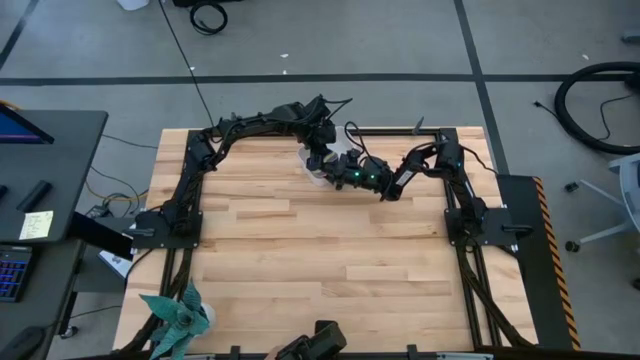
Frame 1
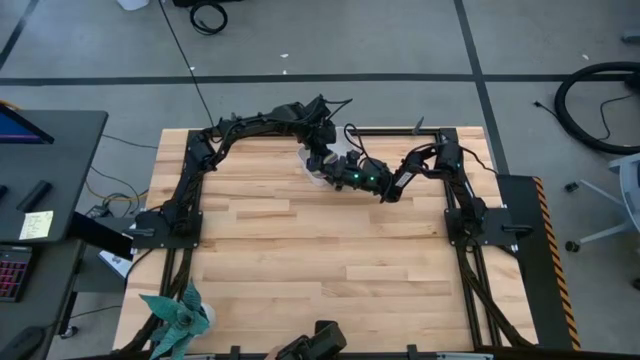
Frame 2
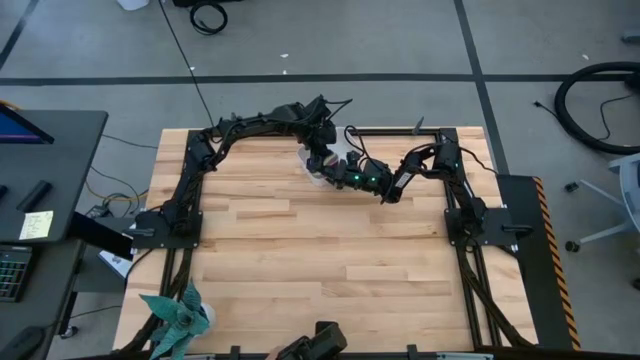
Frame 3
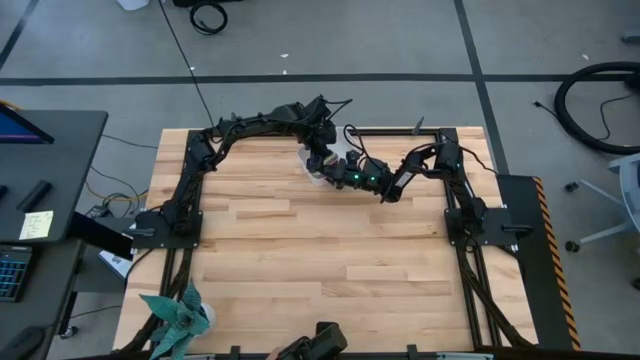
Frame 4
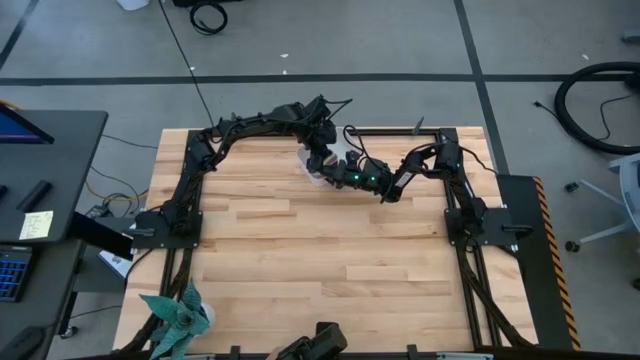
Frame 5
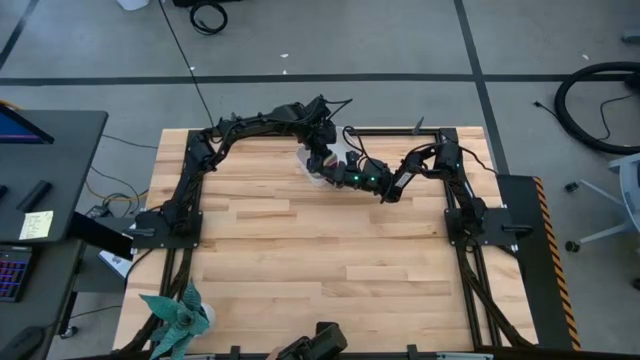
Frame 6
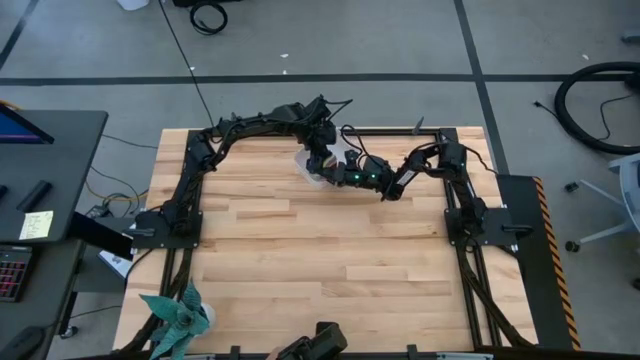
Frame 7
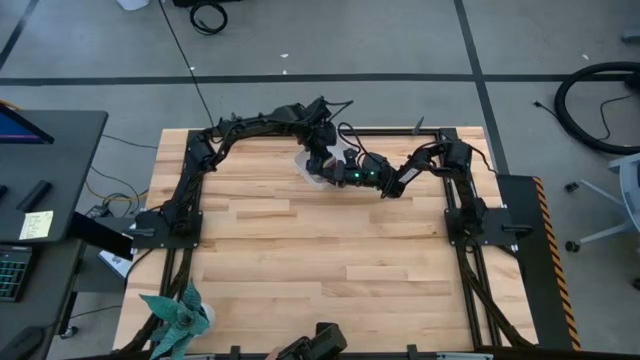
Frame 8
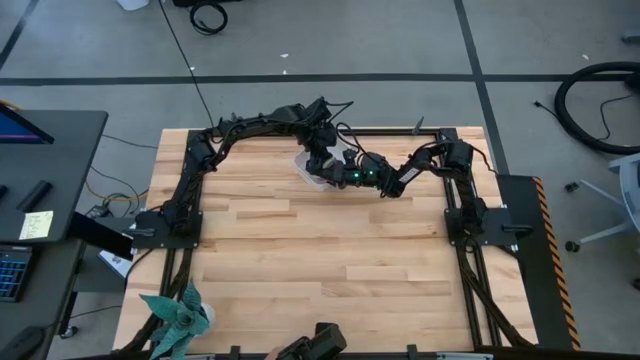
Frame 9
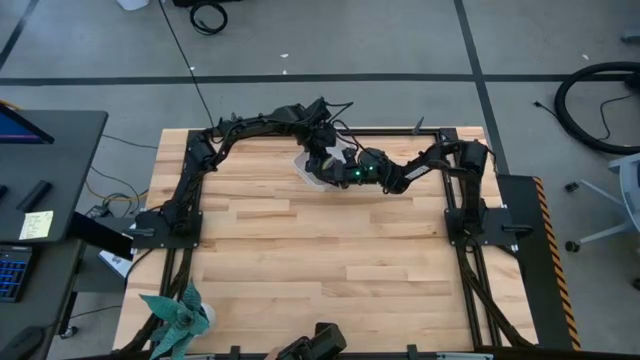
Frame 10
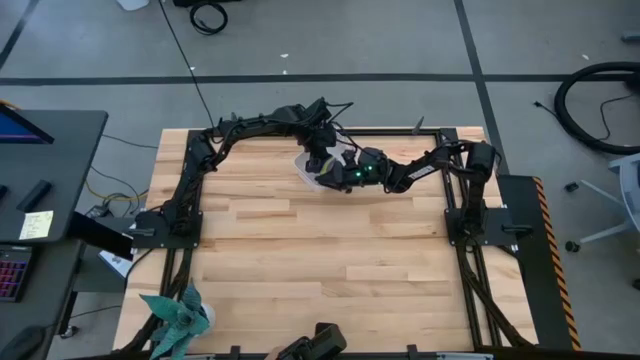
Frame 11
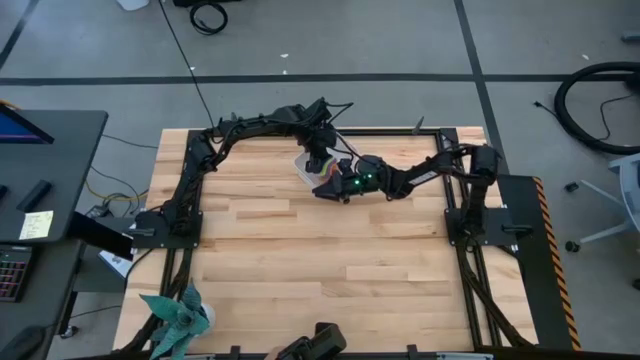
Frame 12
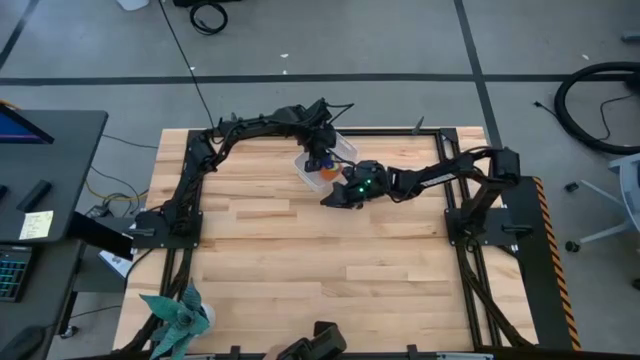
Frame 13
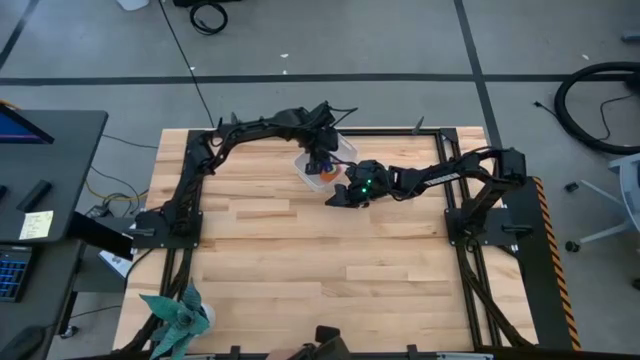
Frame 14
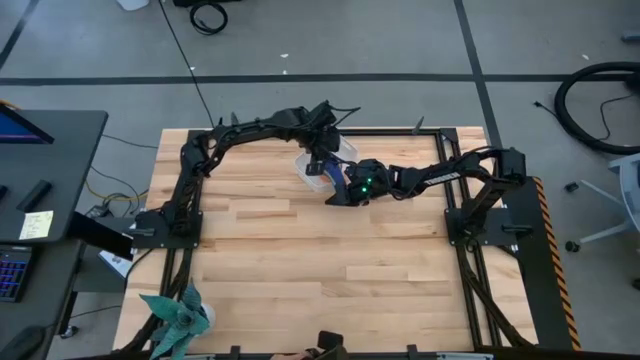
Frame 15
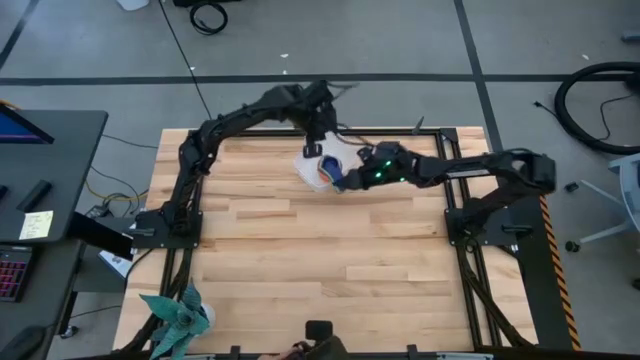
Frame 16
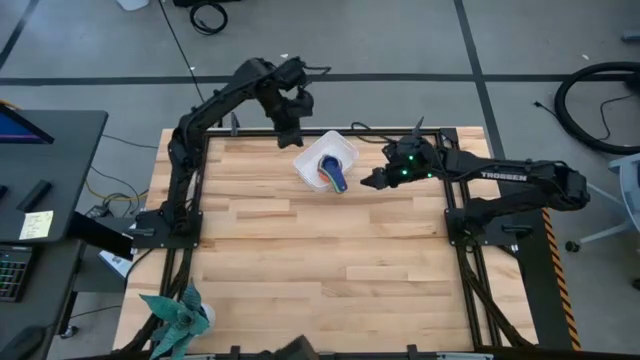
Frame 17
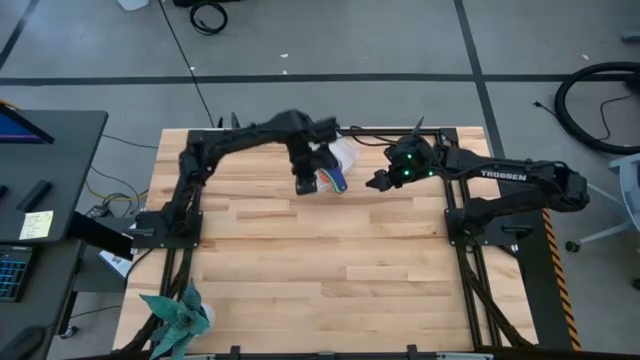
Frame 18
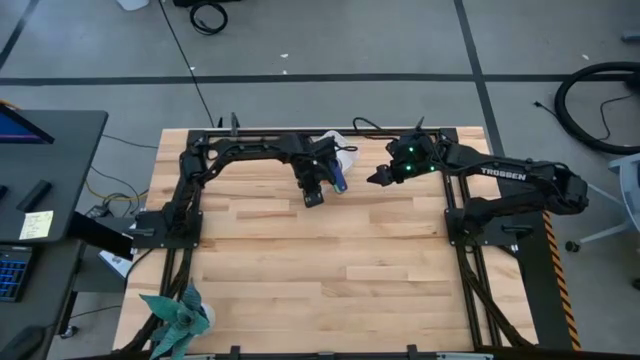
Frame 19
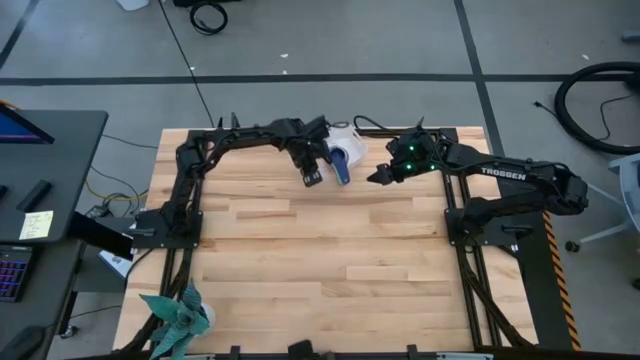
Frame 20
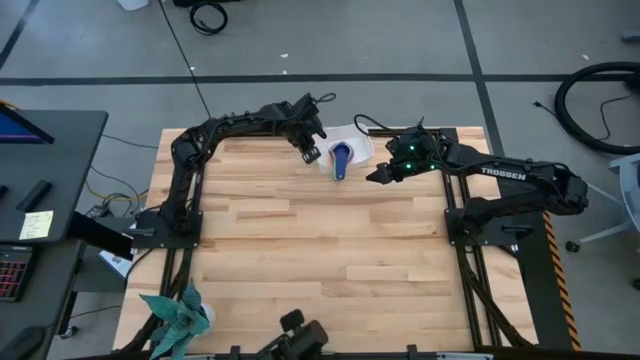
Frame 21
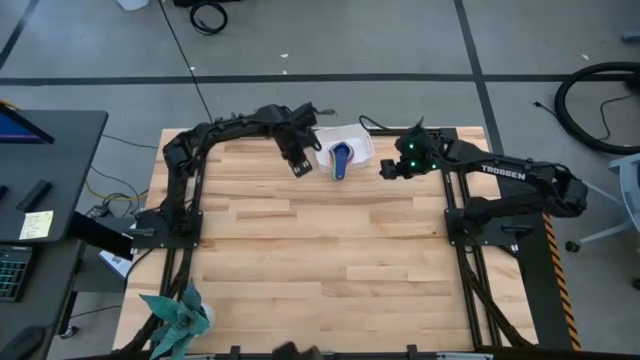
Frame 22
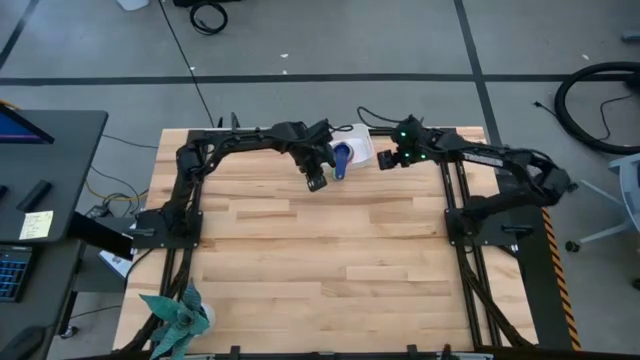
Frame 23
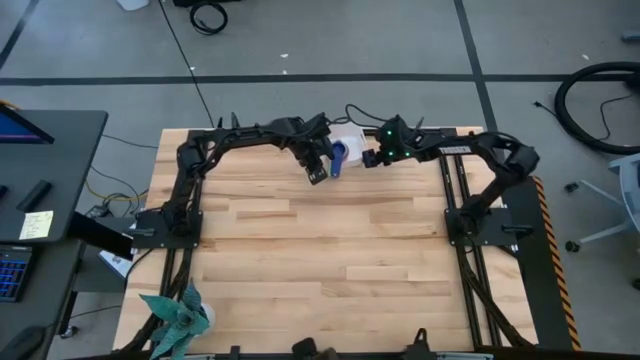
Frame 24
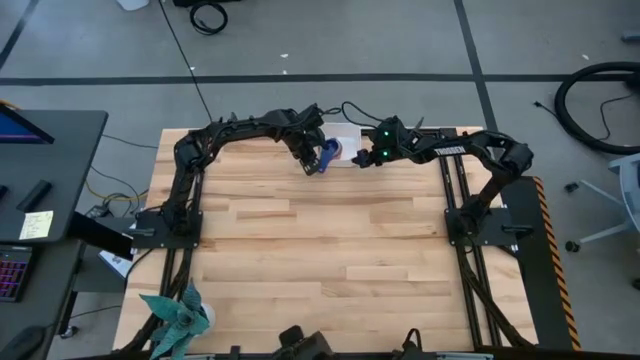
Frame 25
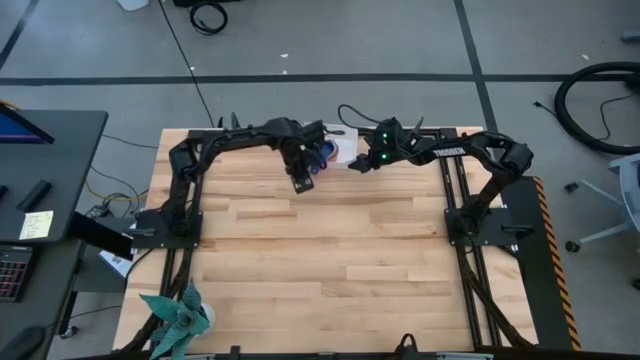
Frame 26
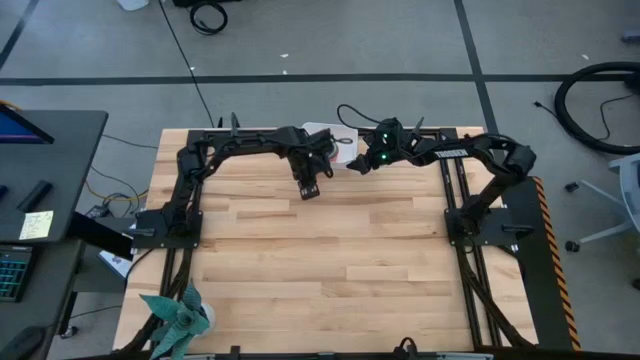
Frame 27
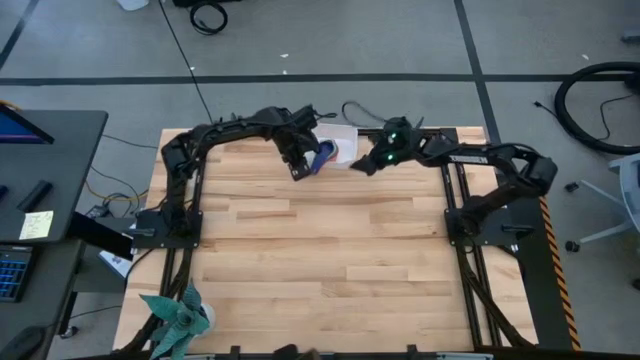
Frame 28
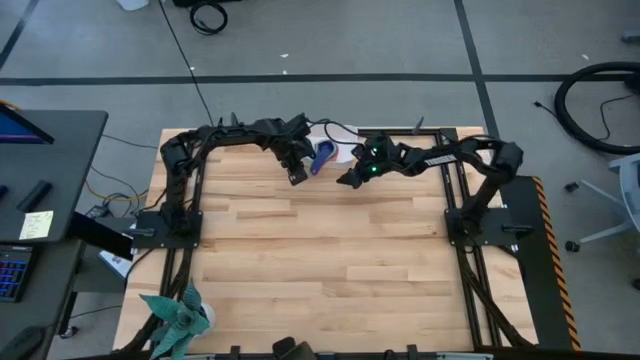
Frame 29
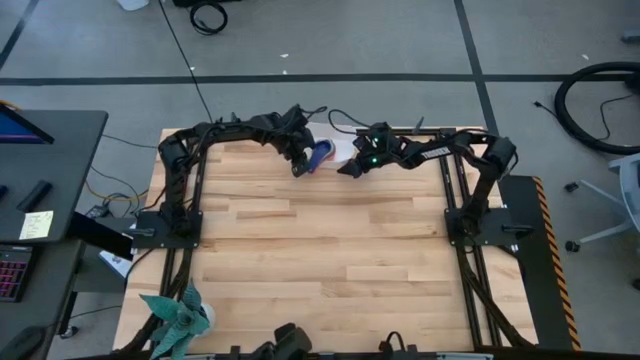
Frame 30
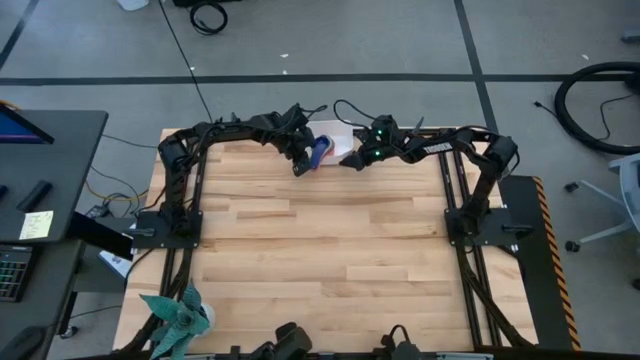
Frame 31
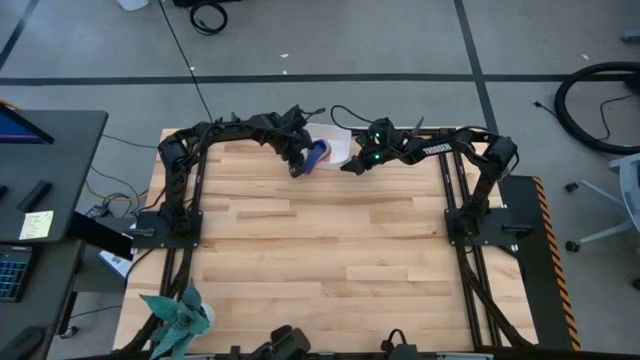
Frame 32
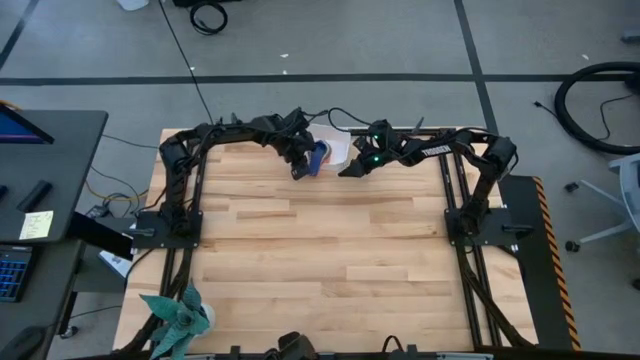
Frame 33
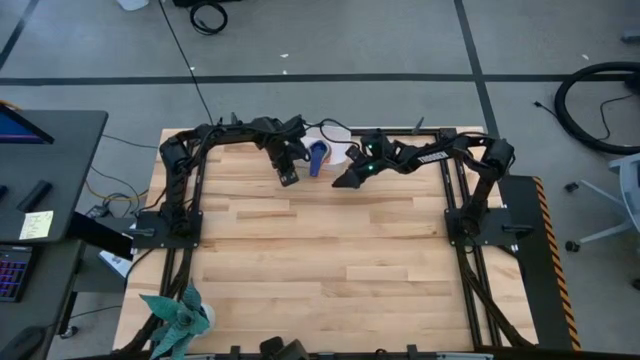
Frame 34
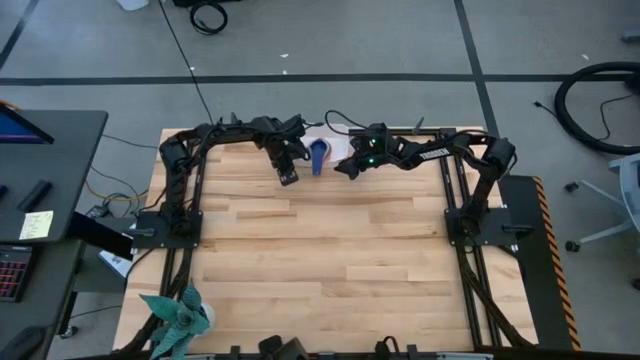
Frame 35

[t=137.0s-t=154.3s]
Task: Nest measuring cups in basket
Put the nested measuring cups into the white bin

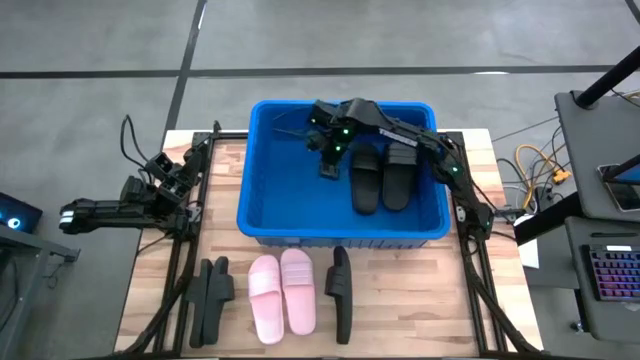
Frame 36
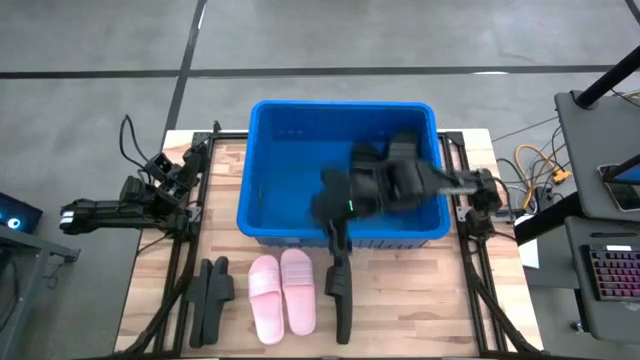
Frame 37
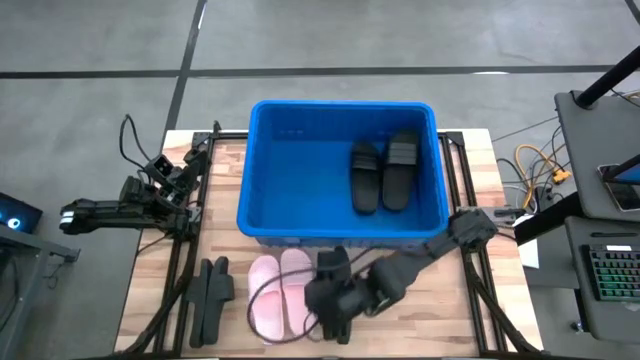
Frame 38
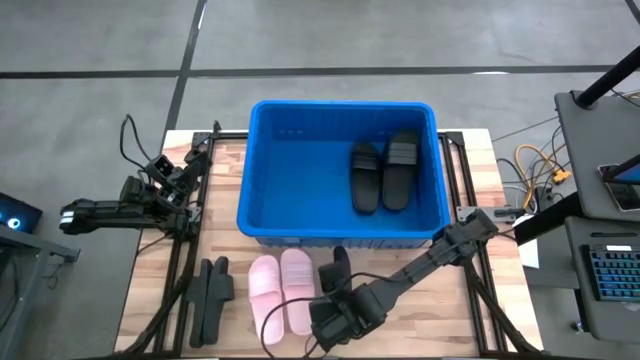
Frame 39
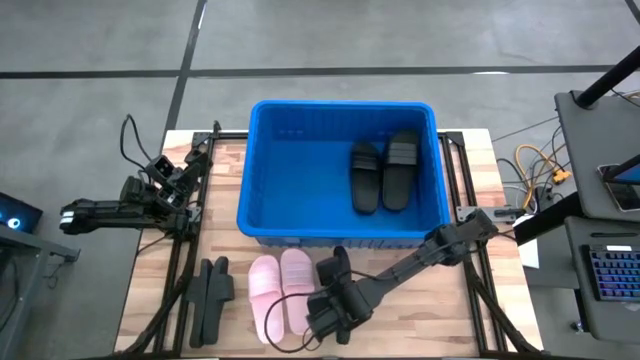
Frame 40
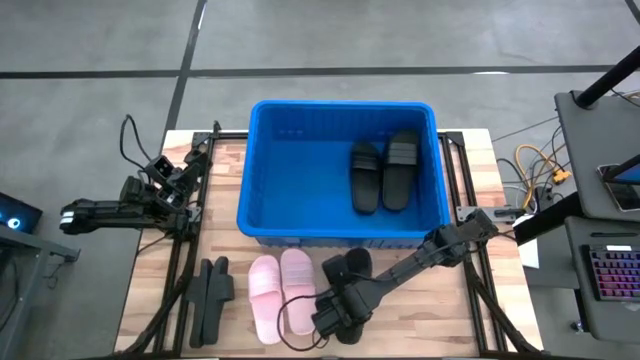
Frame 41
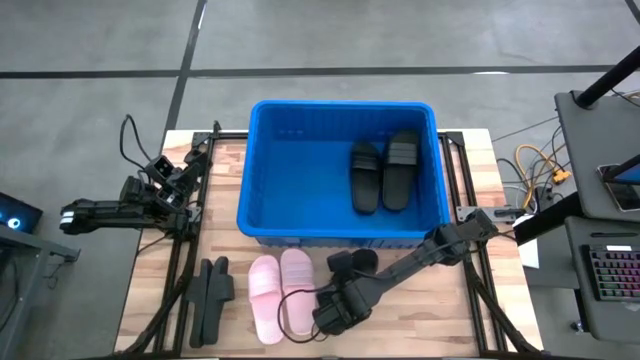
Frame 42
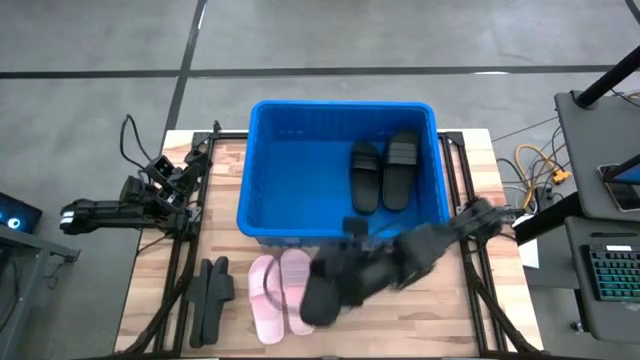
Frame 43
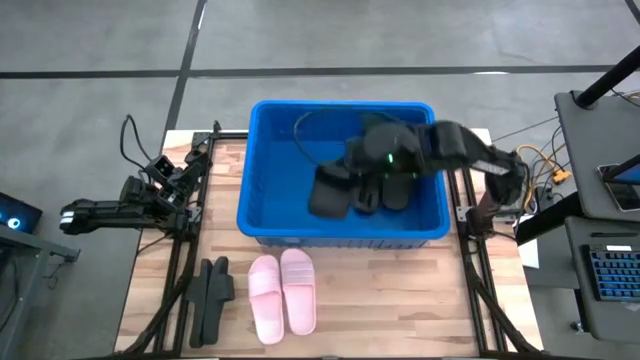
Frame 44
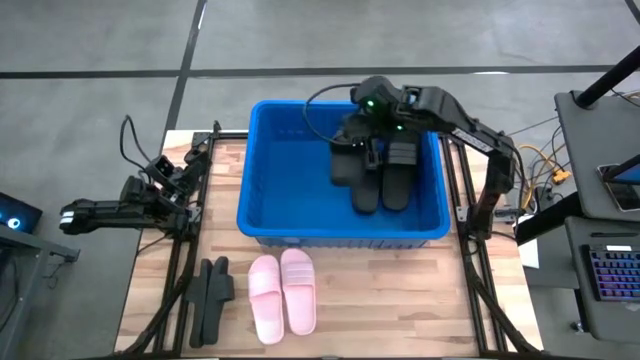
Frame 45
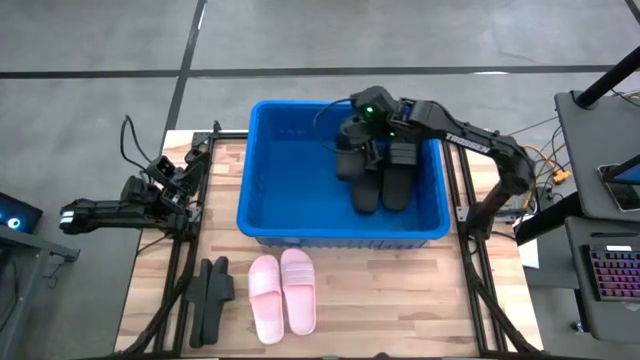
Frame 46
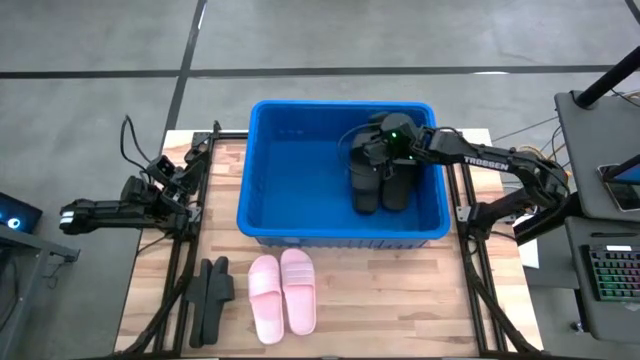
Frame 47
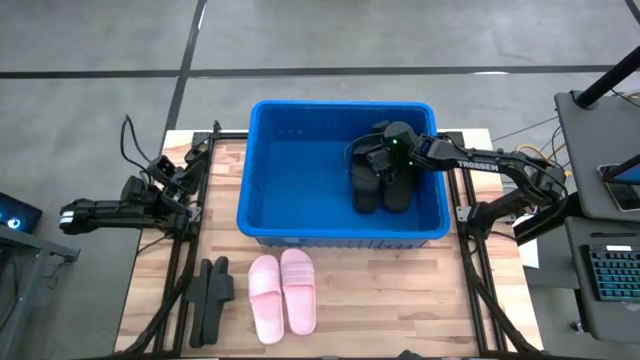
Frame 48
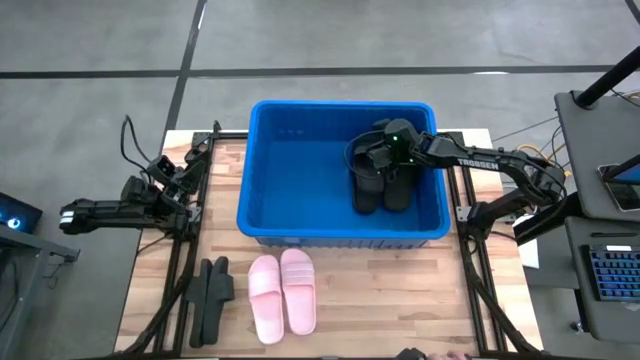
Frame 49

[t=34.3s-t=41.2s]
Task: Pick and place slides into bin
Put the black slipper into the blue bin
